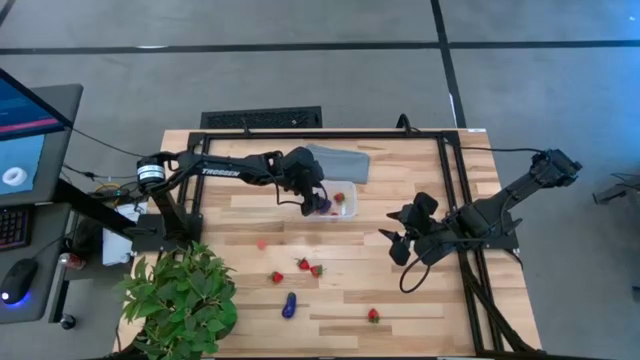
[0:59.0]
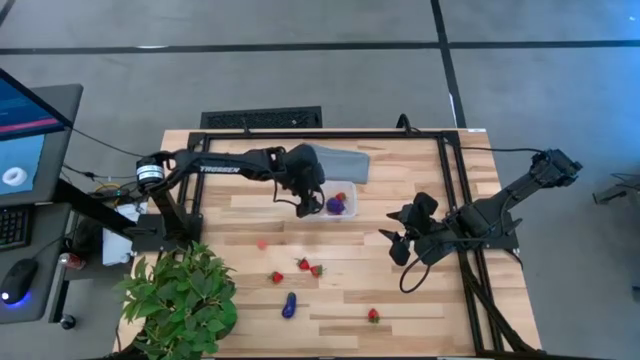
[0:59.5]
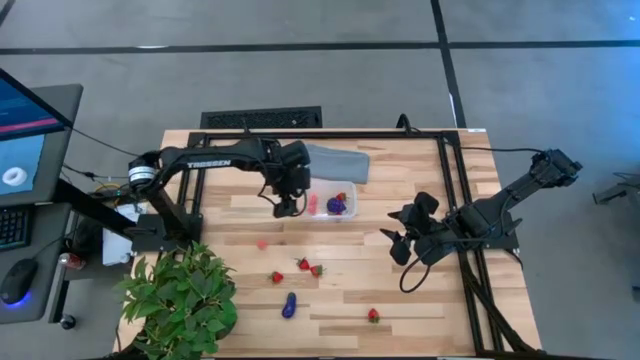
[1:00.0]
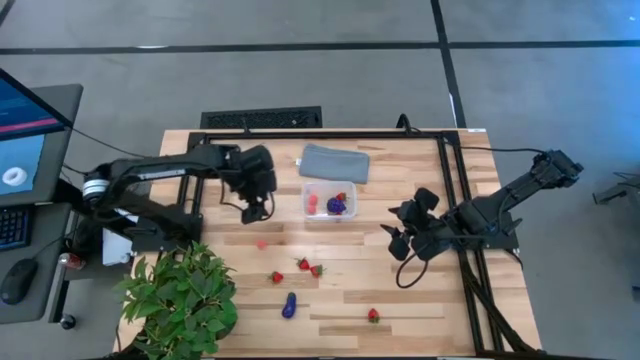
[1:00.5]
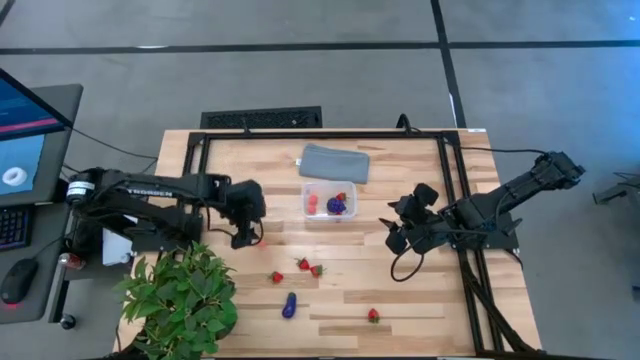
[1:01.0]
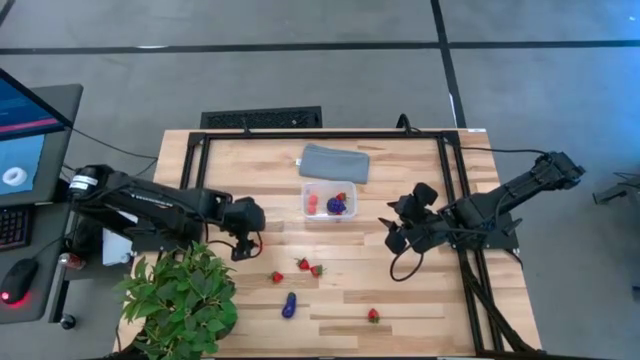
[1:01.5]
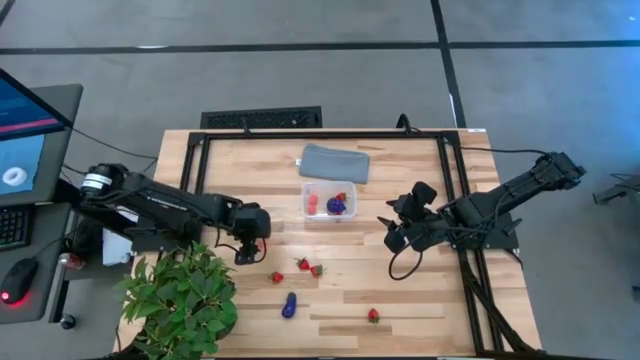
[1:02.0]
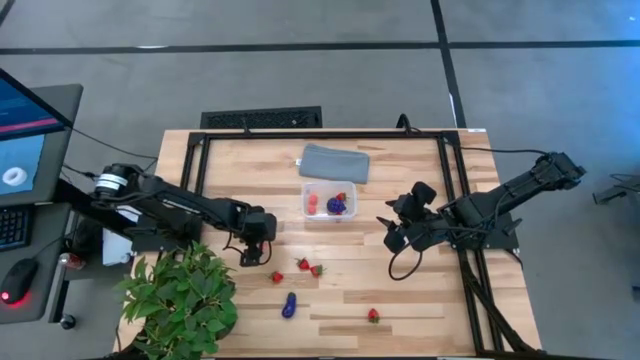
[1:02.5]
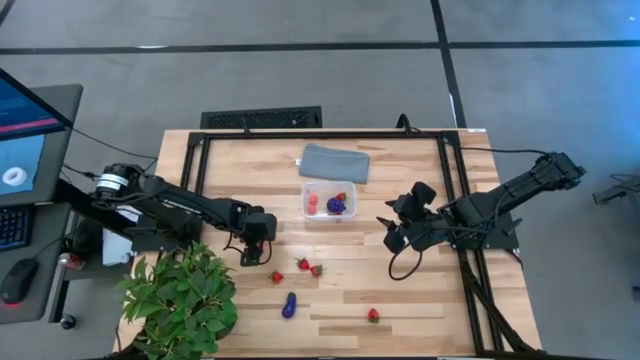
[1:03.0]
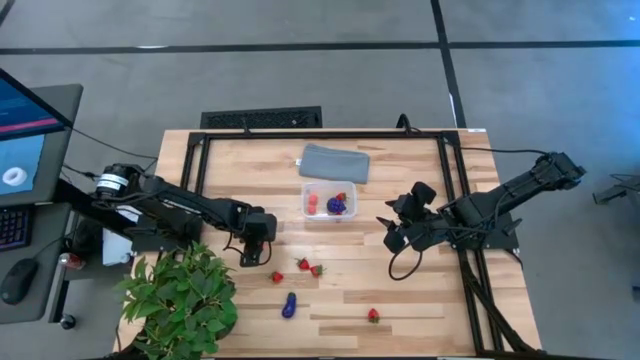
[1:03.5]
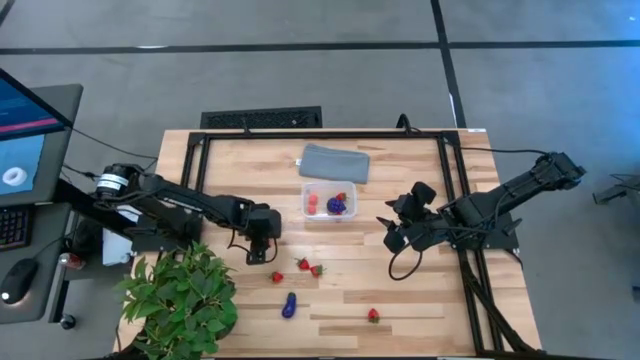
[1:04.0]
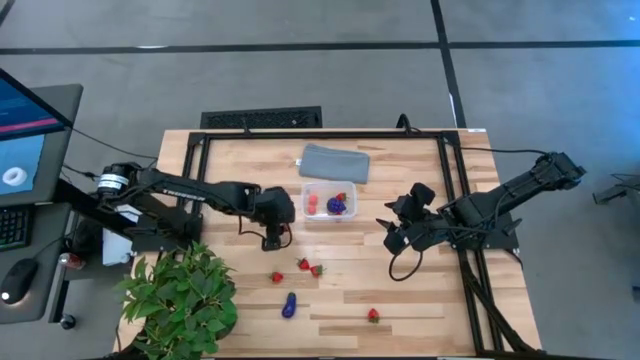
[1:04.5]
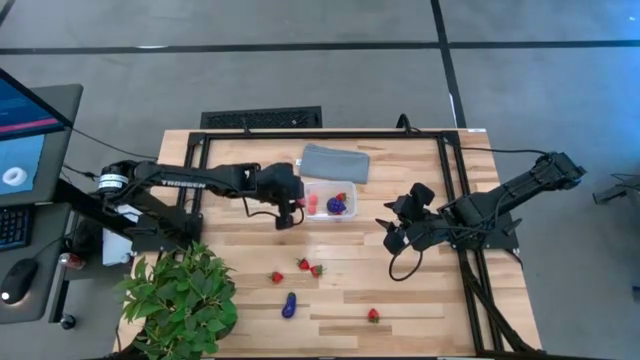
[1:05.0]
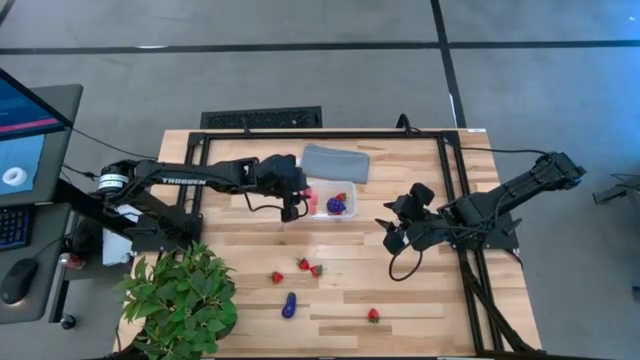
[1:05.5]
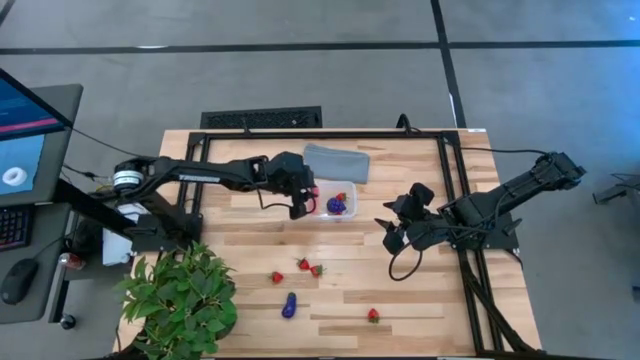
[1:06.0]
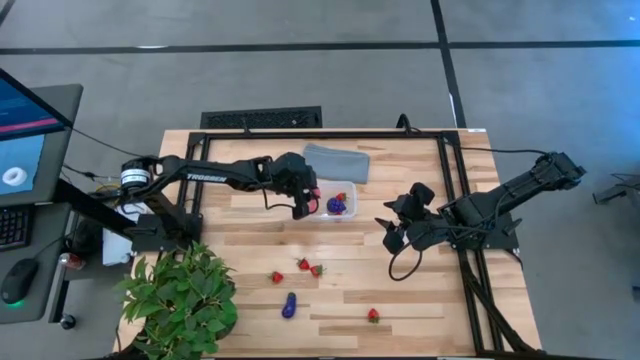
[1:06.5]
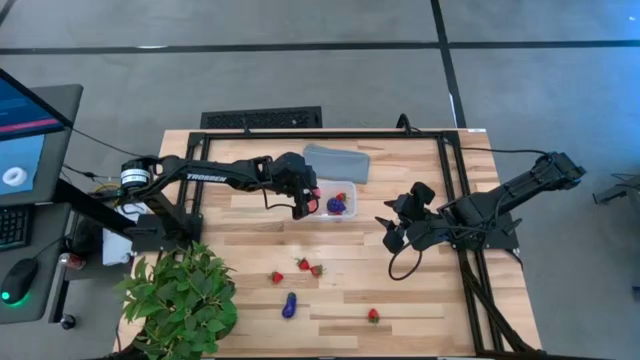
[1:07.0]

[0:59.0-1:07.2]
Task: Pick and placing Produce into tupperware
Put the pink peach into the transparent bin

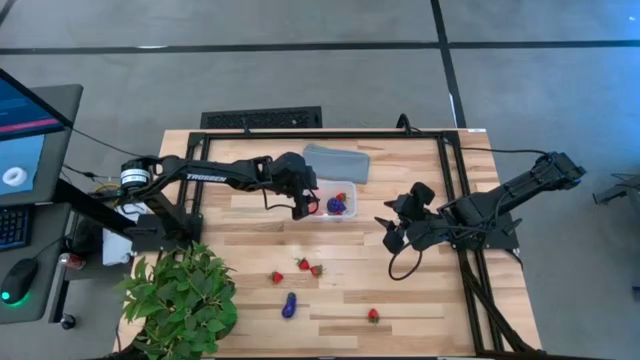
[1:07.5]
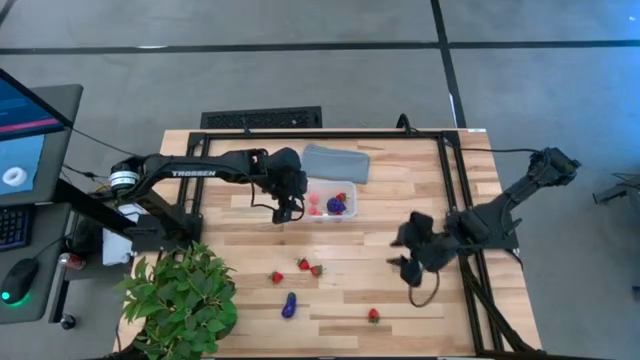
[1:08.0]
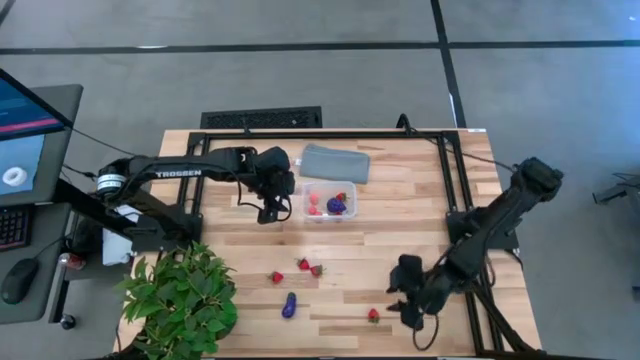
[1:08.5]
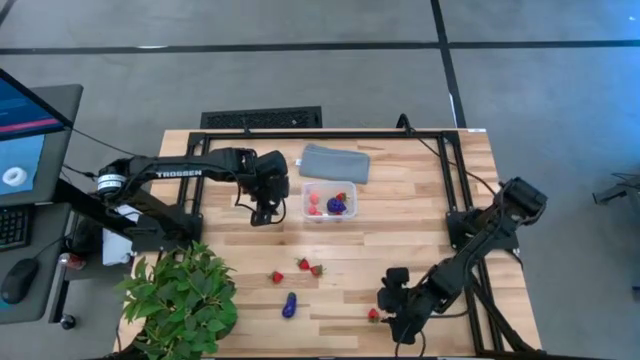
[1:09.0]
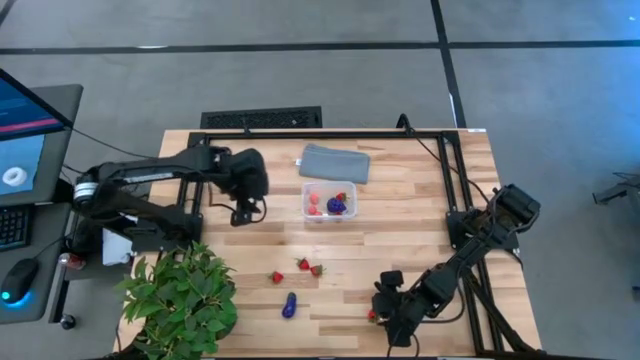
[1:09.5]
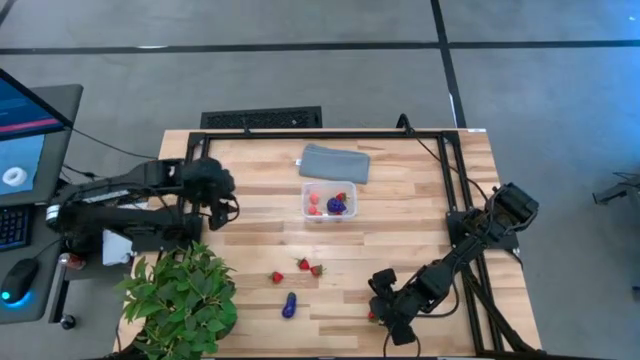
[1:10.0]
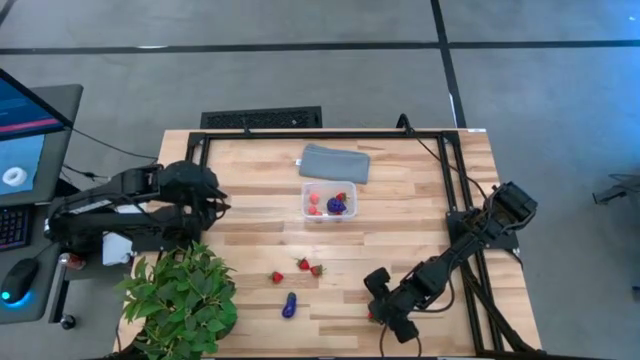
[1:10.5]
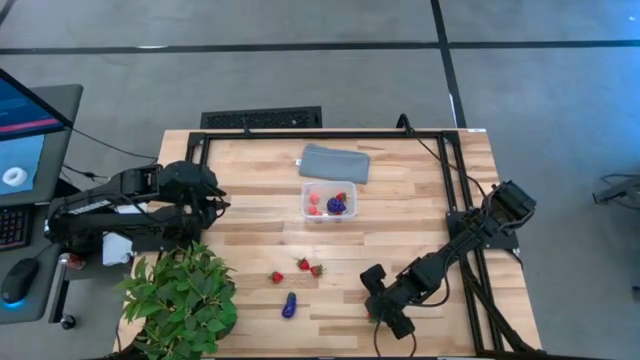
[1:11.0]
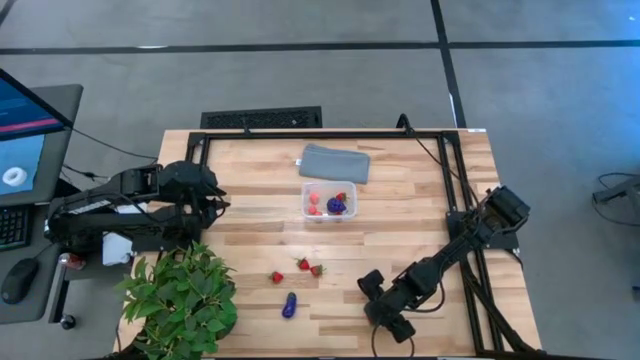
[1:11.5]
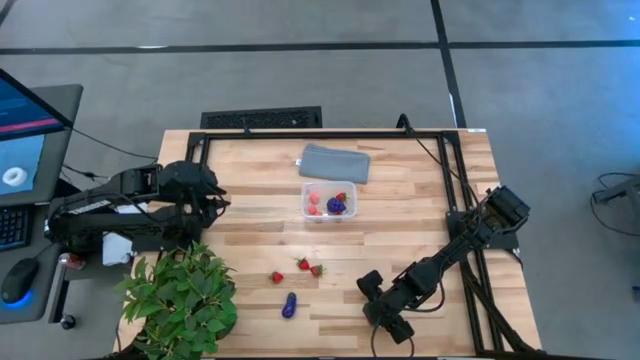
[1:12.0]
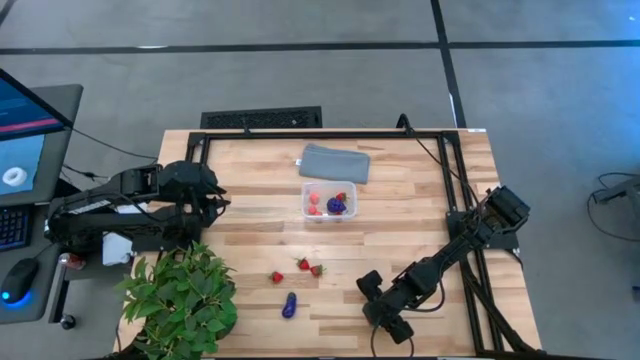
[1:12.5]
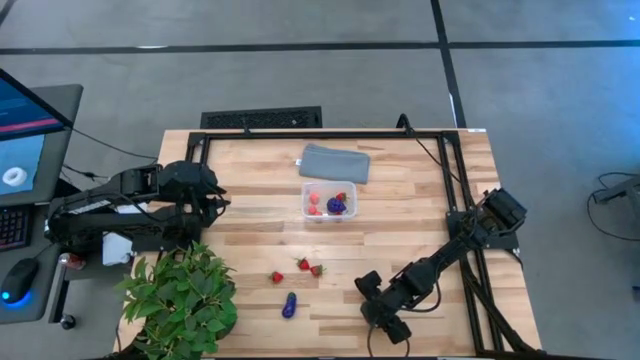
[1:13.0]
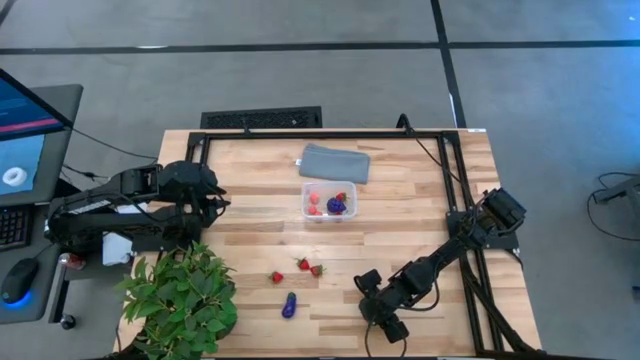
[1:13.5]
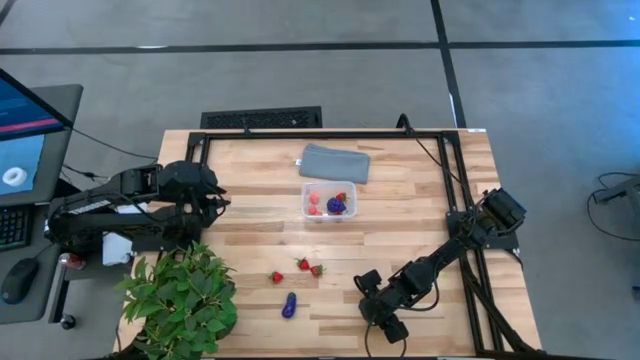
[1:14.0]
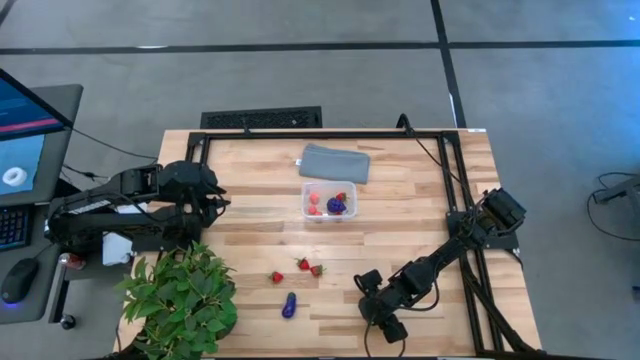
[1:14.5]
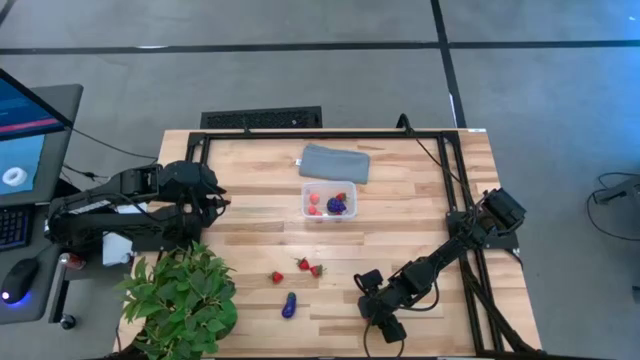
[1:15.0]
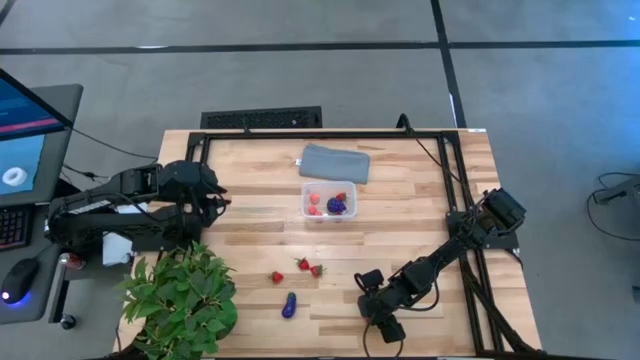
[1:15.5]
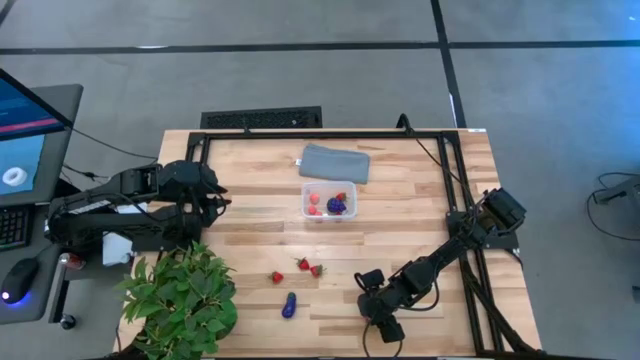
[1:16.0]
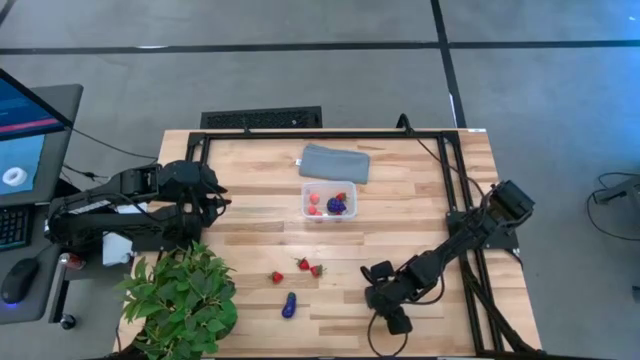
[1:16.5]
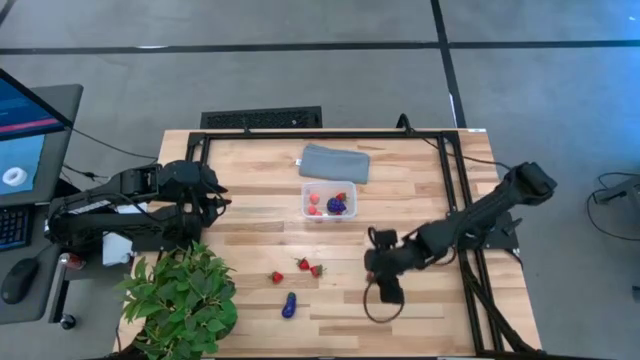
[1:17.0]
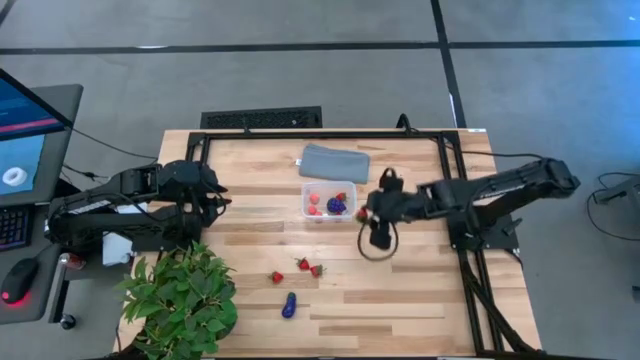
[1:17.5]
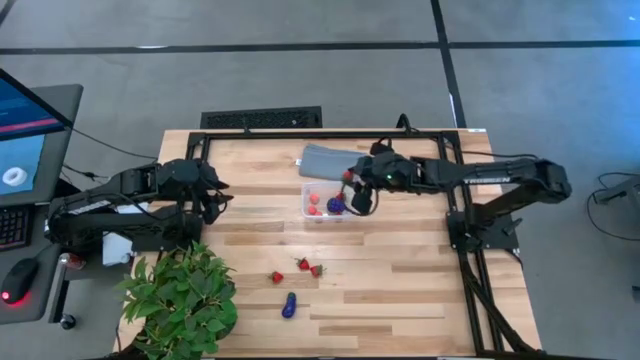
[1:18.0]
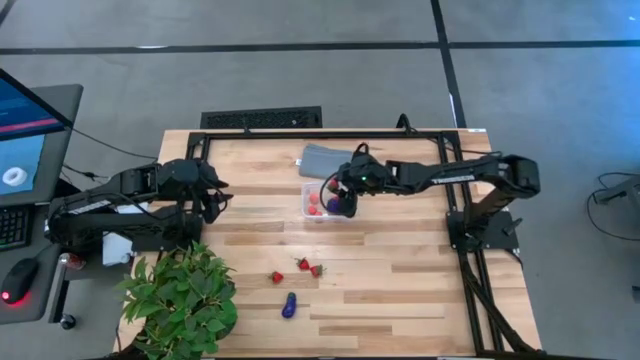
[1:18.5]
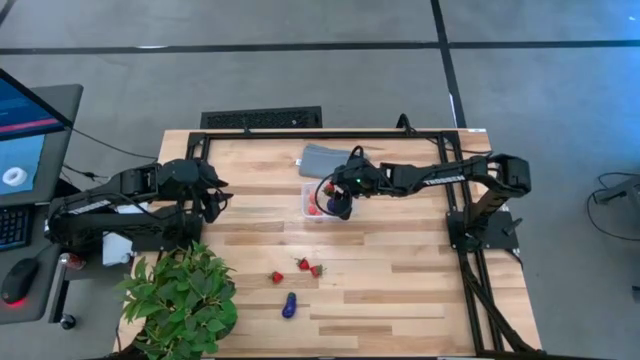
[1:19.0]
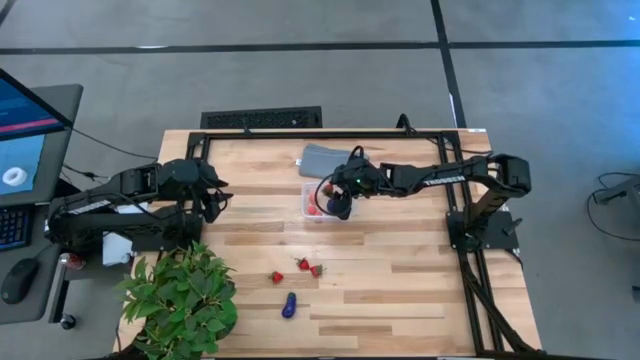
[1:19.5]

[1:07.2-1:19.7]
Put the red strawberry into the transparent bin
